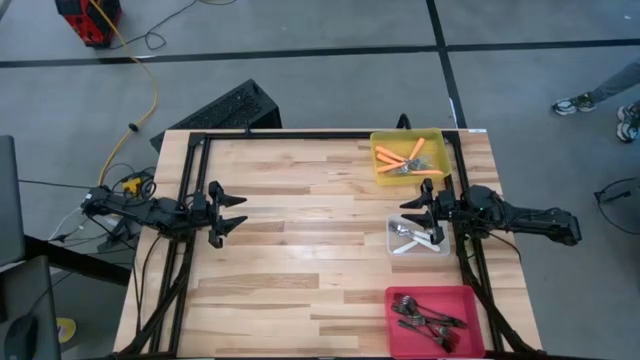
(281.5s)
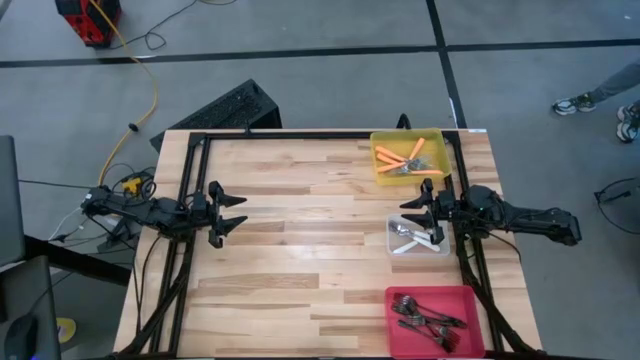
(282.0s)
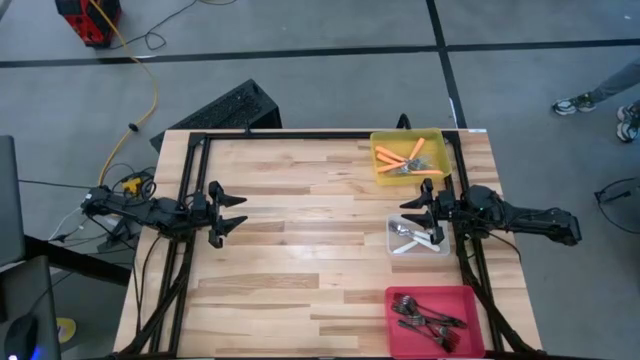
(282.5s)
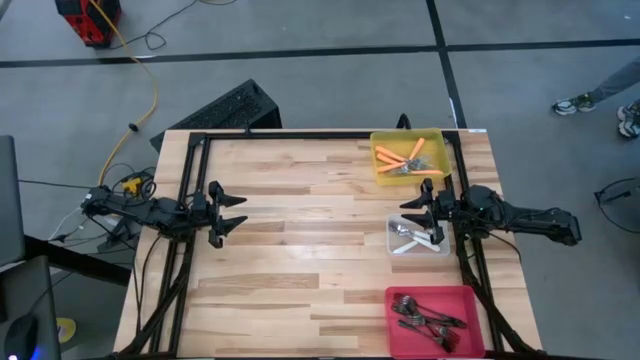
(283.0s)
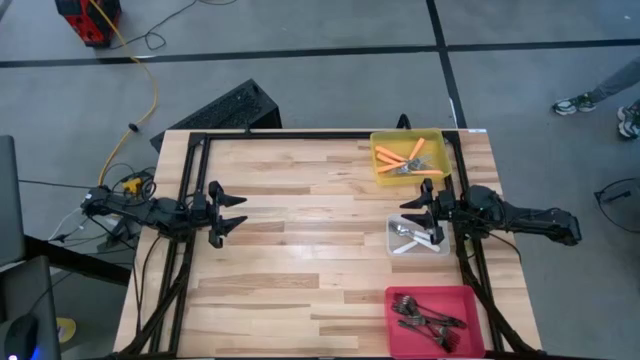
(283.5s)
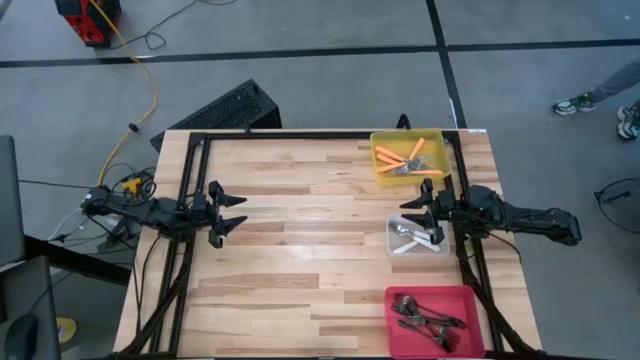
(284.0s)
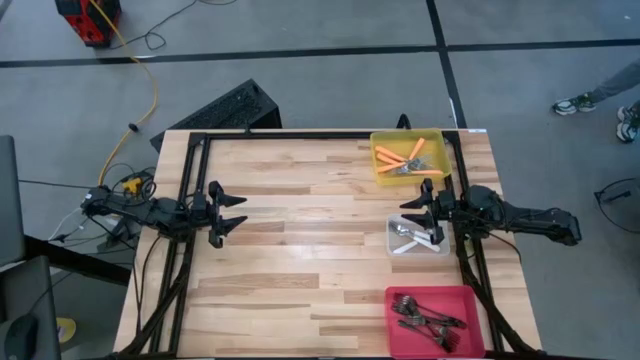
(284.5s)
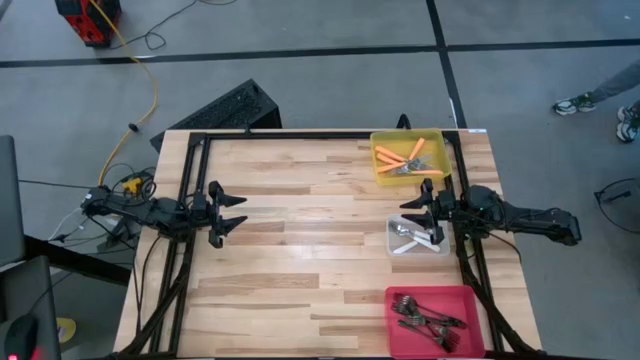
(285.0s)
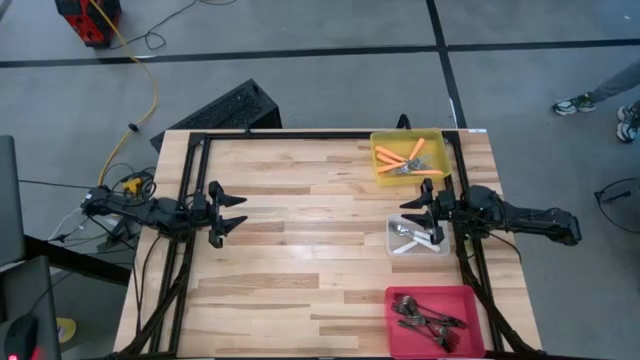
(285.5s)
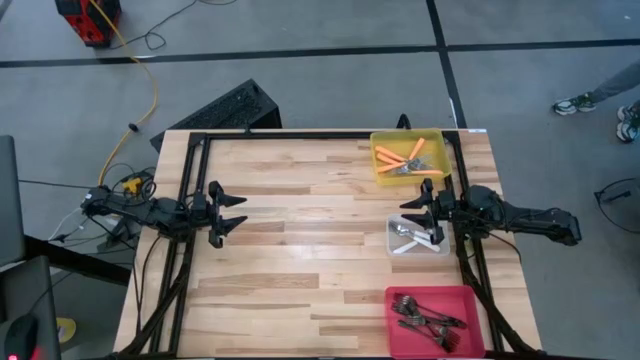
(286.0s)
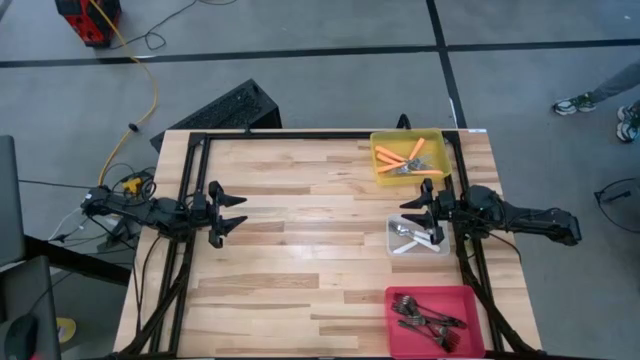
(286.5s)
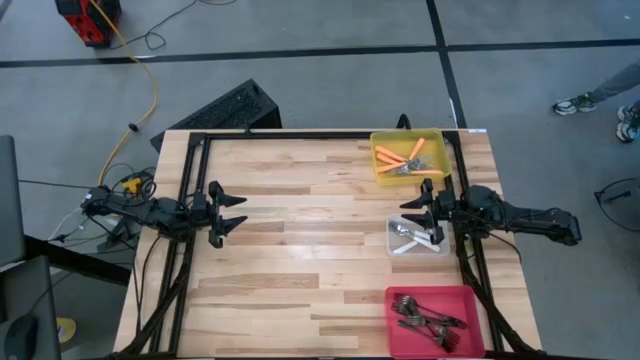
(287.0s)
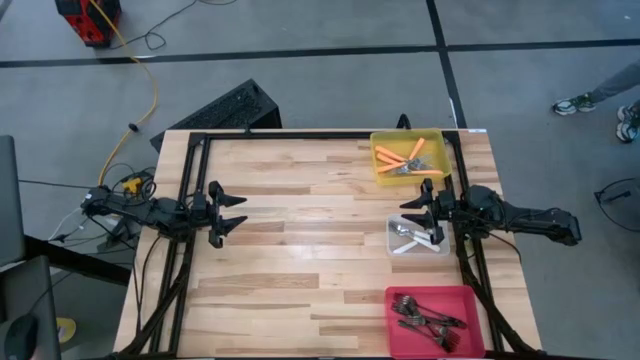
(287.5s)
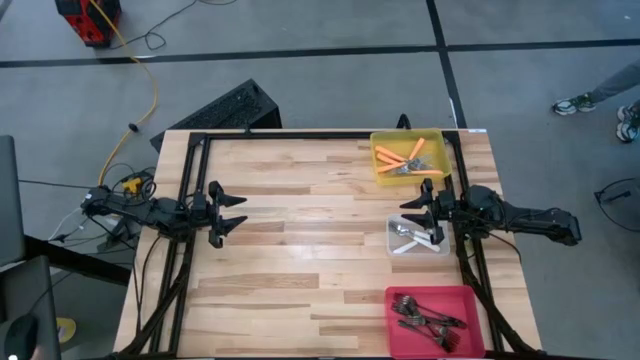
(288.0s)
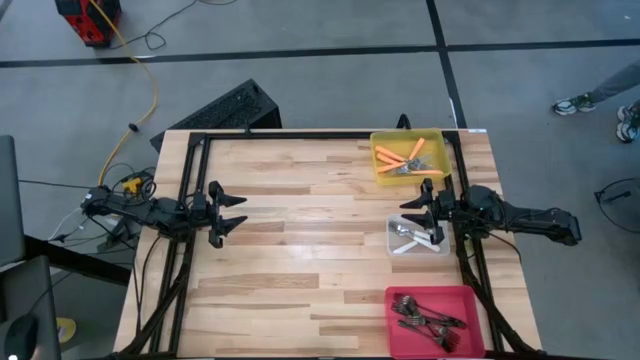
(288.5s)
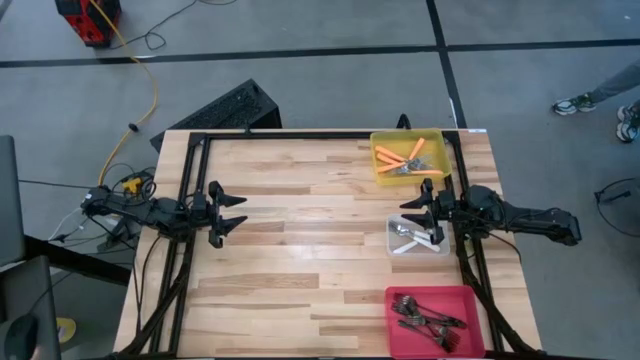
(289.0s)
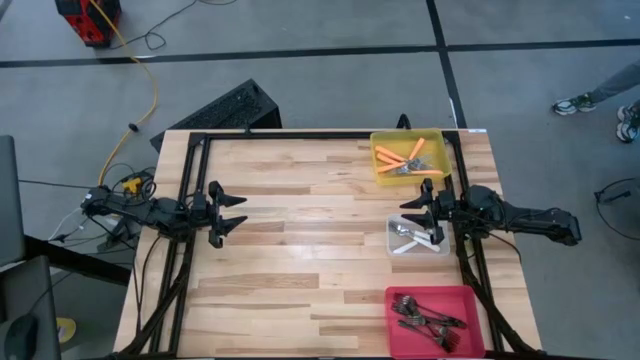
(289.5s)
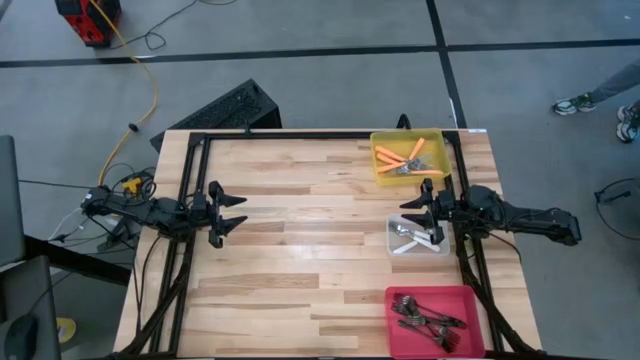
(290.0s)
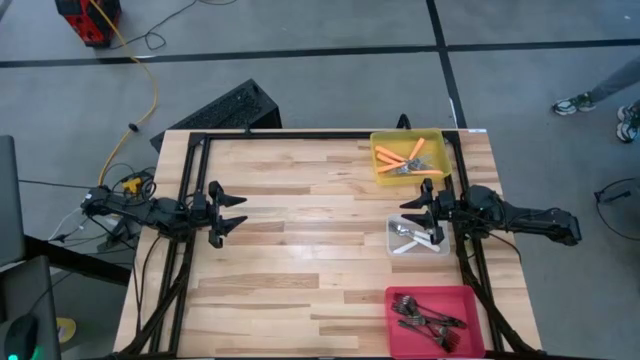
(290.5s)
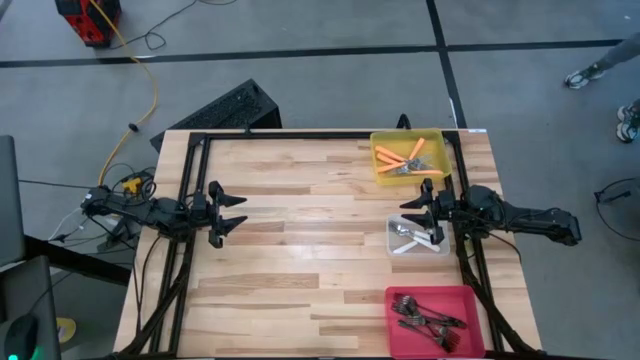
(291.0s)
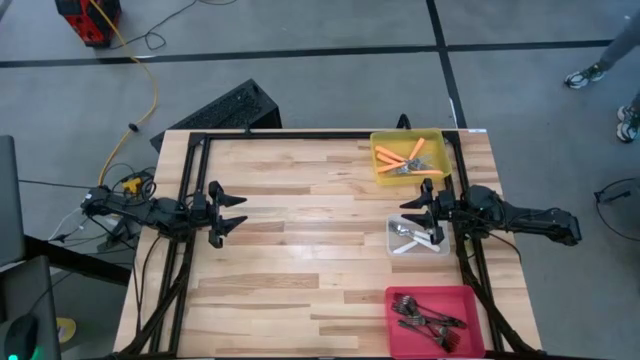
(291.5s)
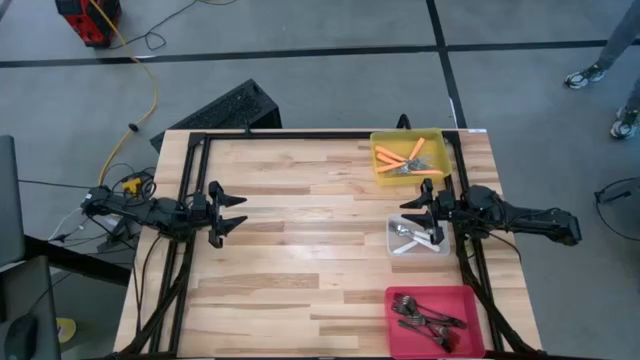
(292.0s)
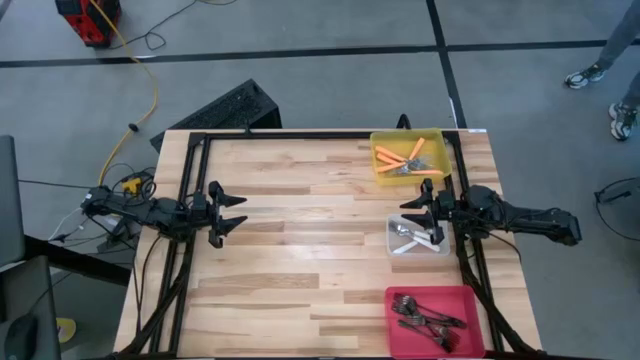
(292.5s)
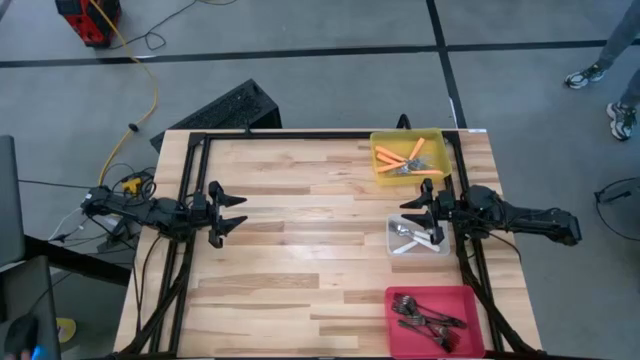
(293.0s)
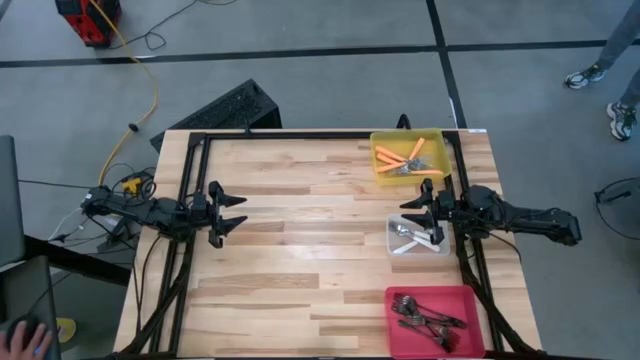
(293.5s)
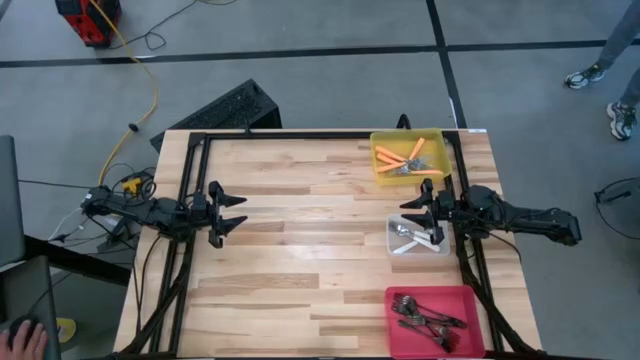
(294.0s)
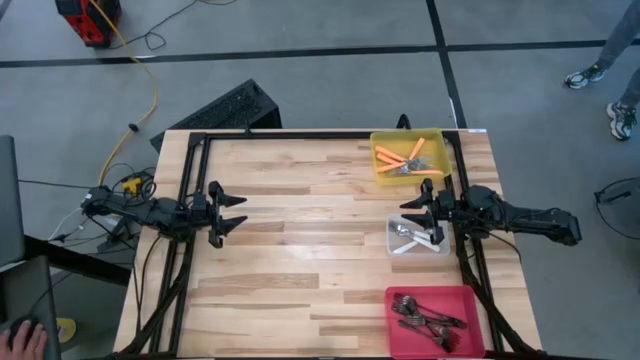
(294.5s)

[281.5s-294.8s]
Task: Sort silverware by color (type)
Return to Home Position

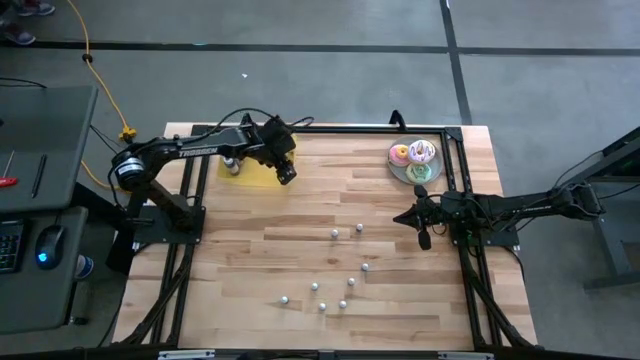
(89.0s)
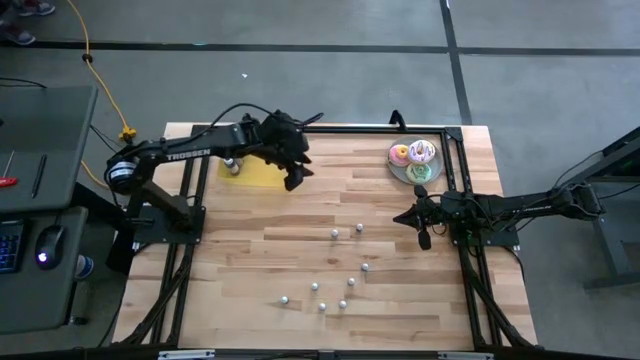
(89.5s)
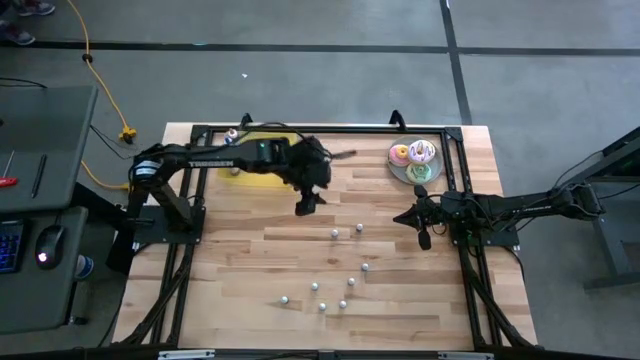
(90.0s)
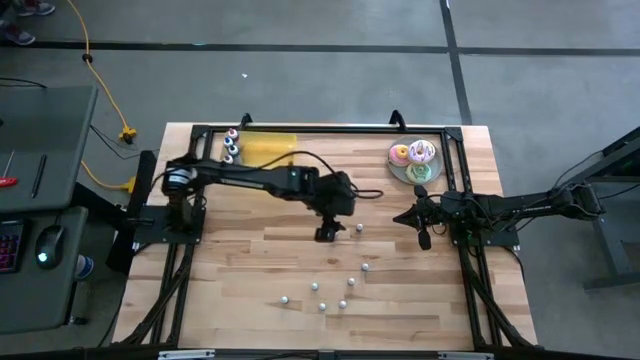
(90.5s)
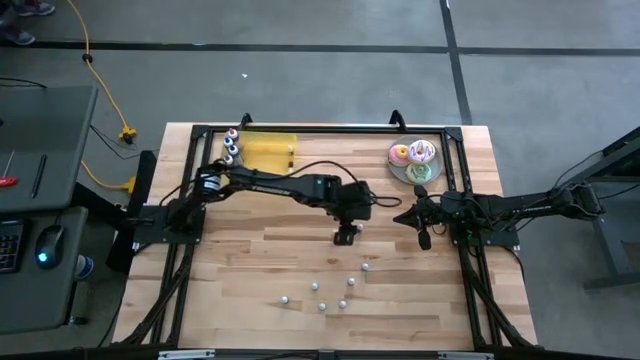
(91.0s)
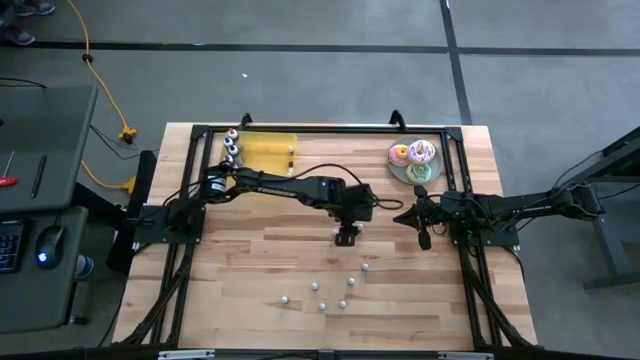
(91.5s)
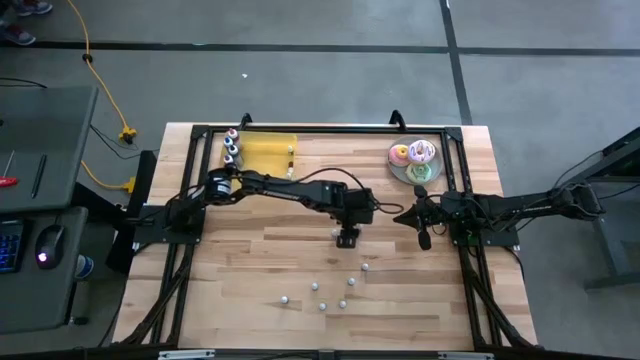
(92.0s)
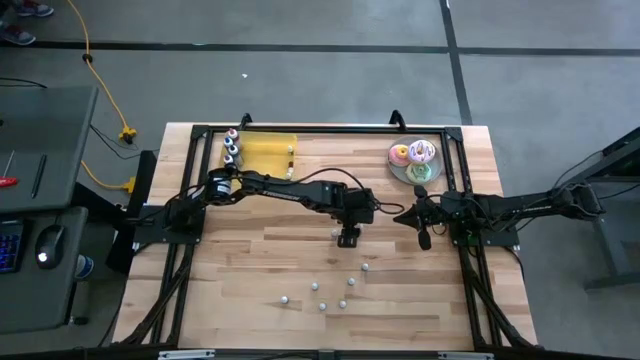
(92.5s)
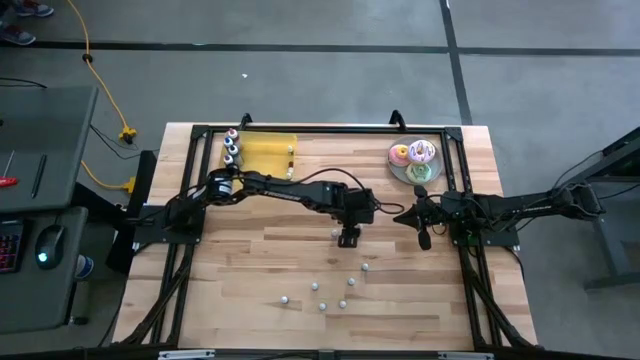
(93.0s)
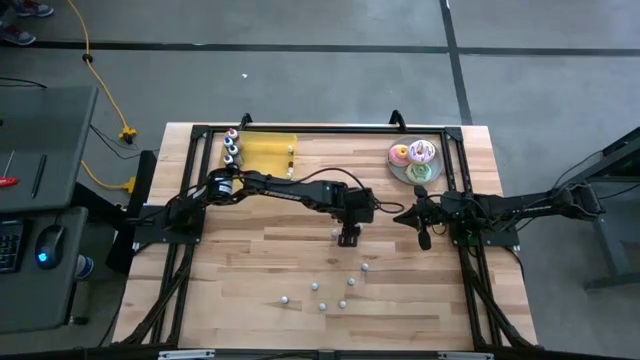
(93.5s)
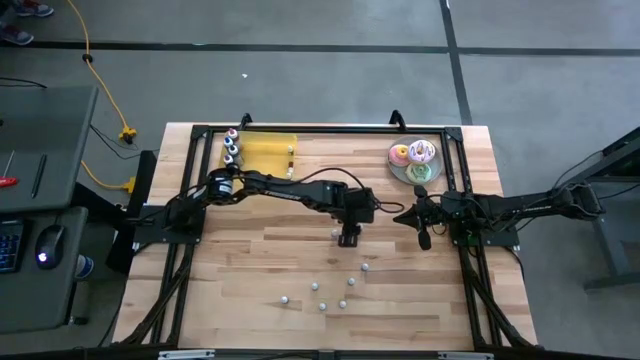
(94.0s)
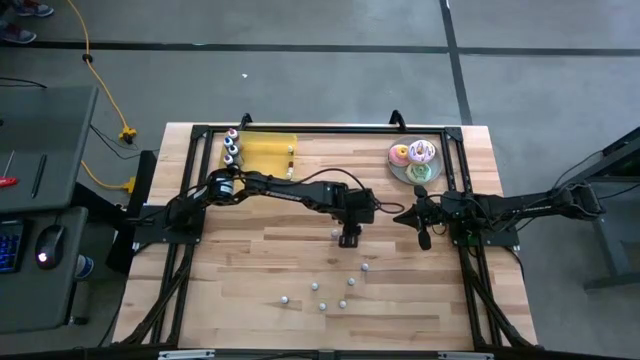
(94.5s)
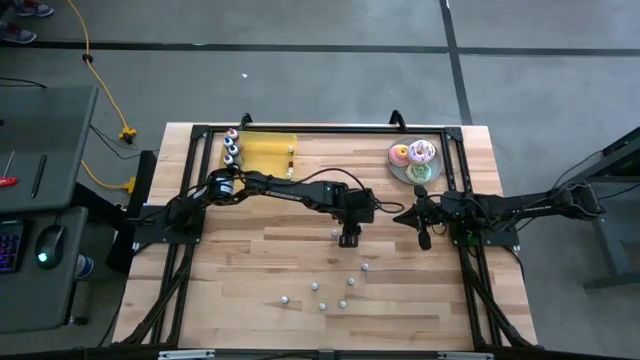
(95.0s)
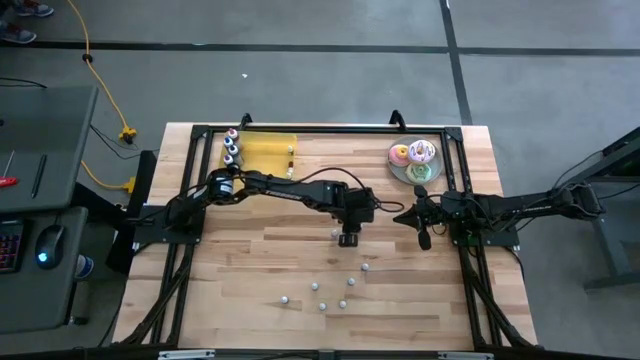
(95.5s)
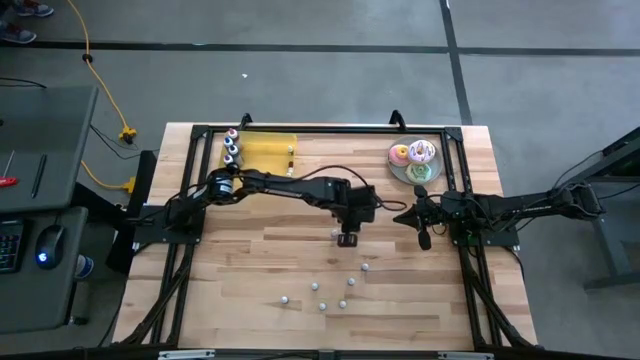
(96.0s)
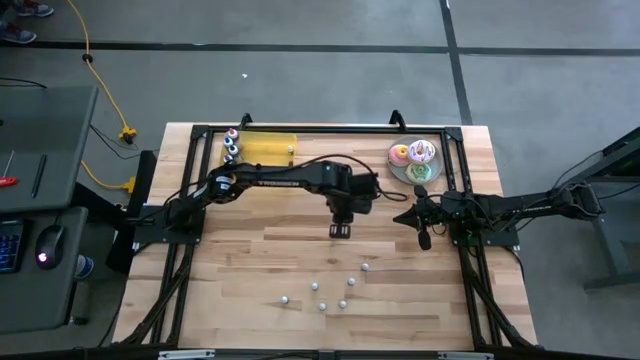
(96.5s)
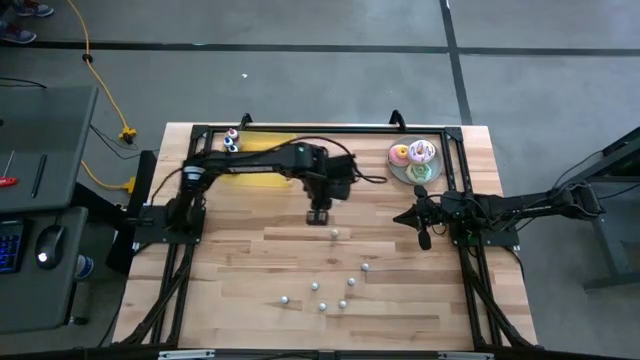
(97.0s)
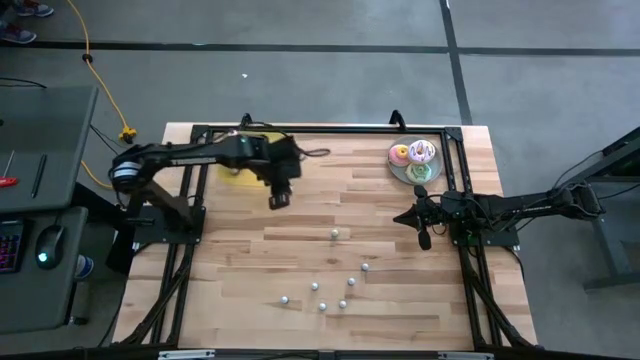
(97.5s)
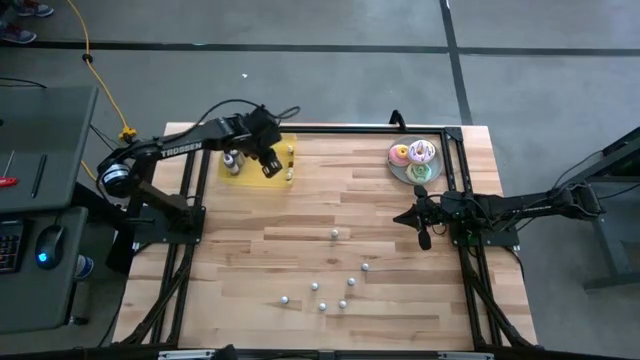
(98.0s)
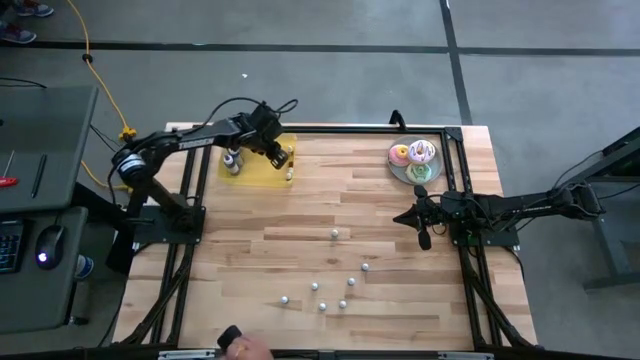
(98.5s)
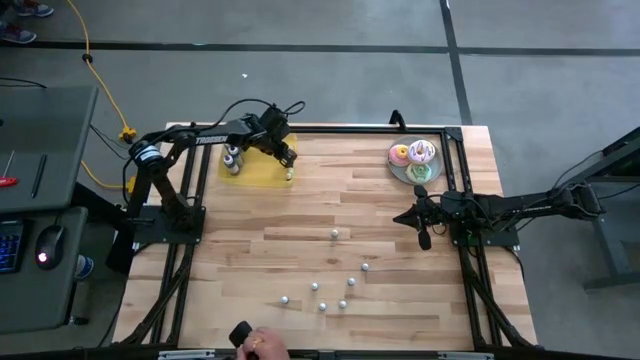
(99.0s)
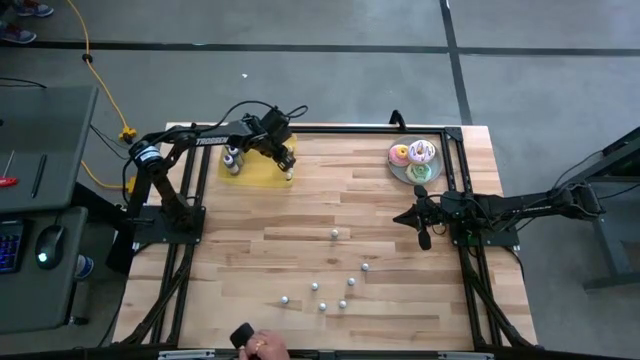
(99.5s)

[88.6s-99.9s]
Task: Pick & Place food coloring
Put the small blue food coloring bottle into the yellow bin
